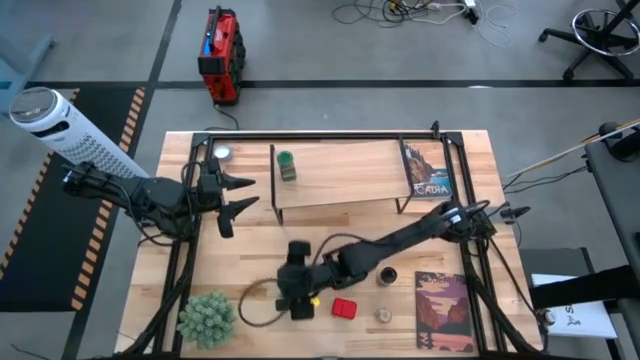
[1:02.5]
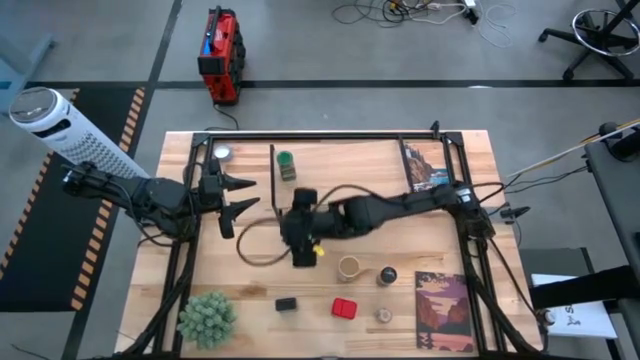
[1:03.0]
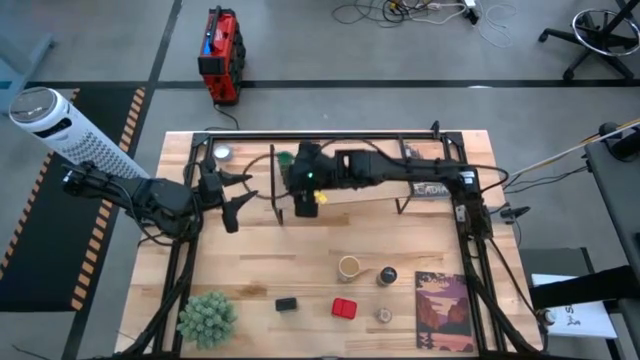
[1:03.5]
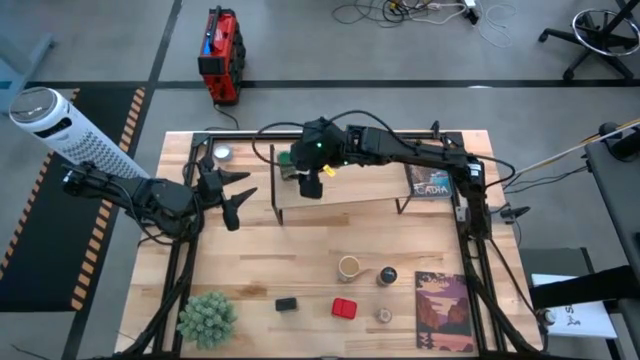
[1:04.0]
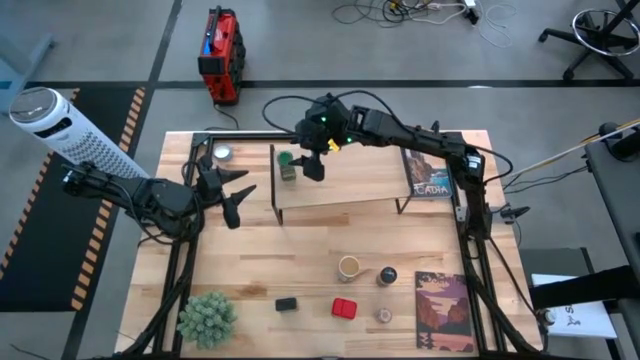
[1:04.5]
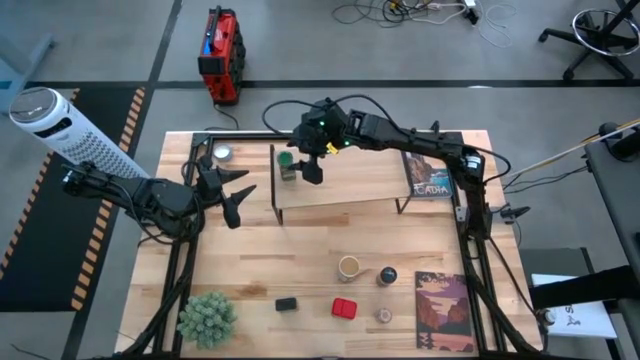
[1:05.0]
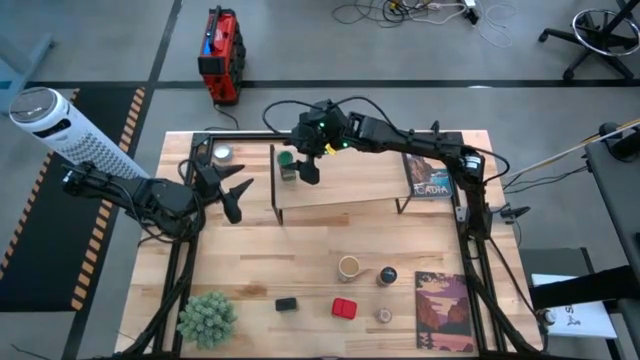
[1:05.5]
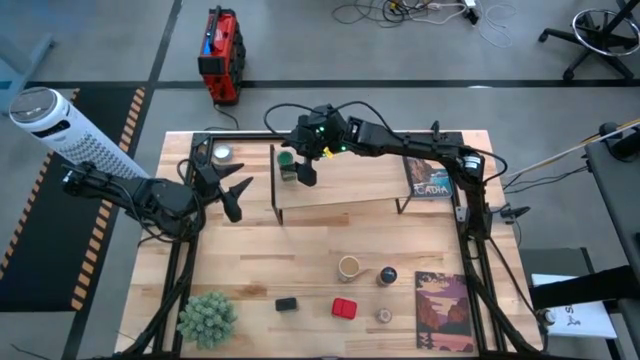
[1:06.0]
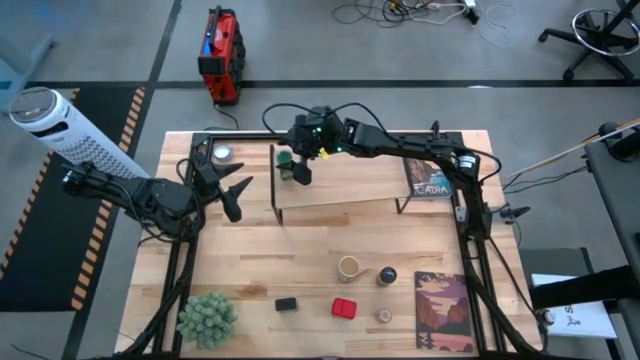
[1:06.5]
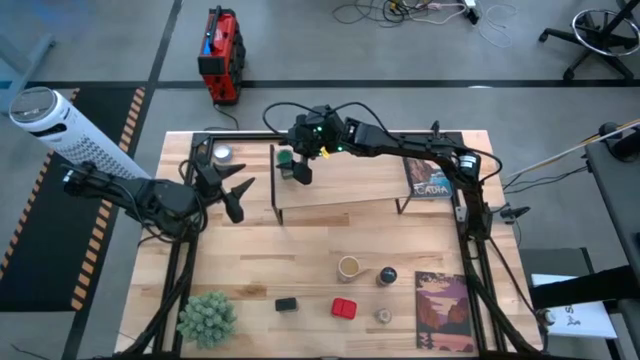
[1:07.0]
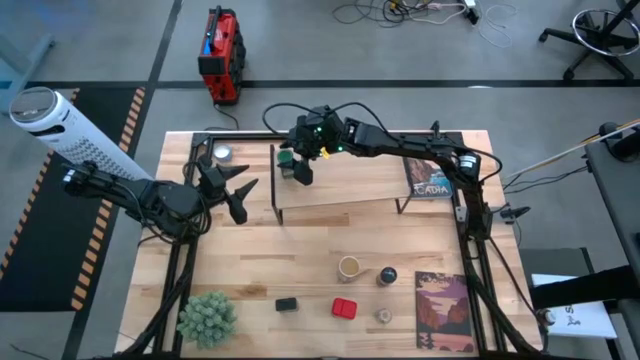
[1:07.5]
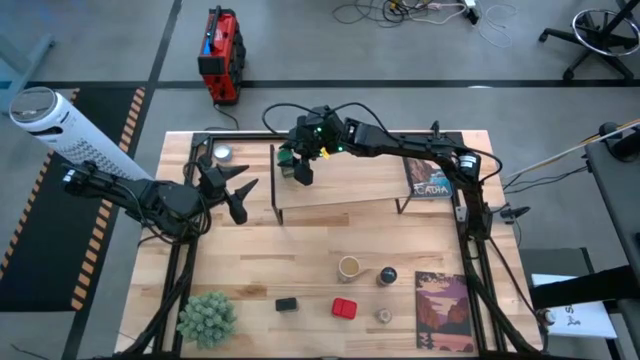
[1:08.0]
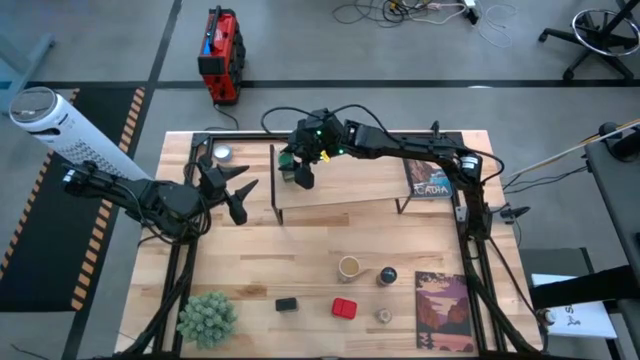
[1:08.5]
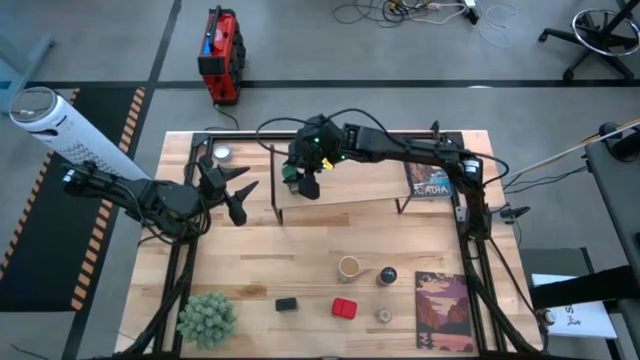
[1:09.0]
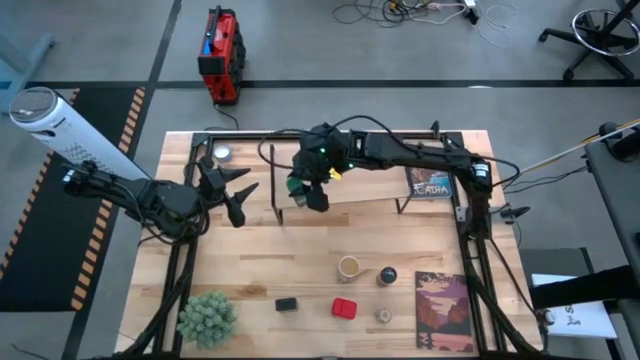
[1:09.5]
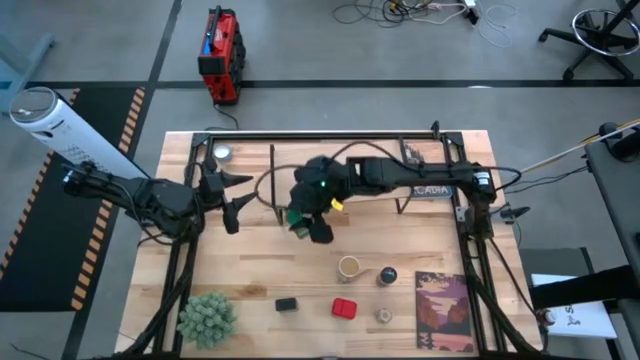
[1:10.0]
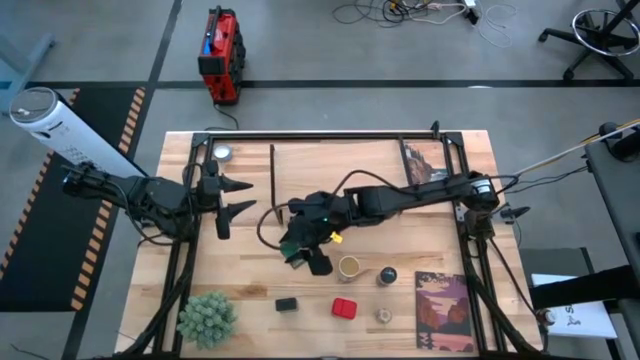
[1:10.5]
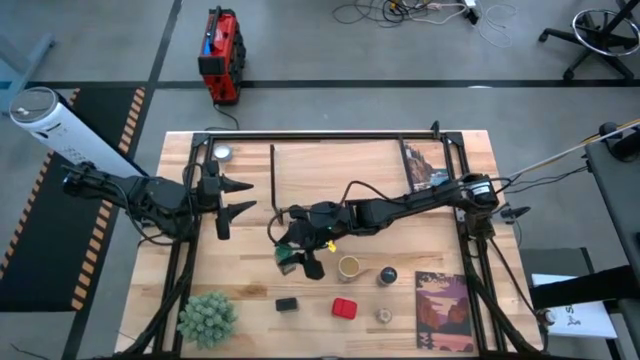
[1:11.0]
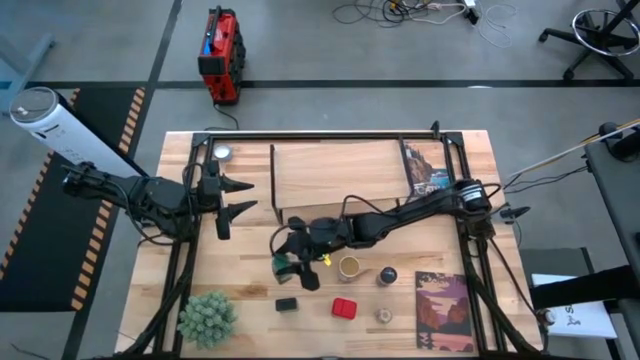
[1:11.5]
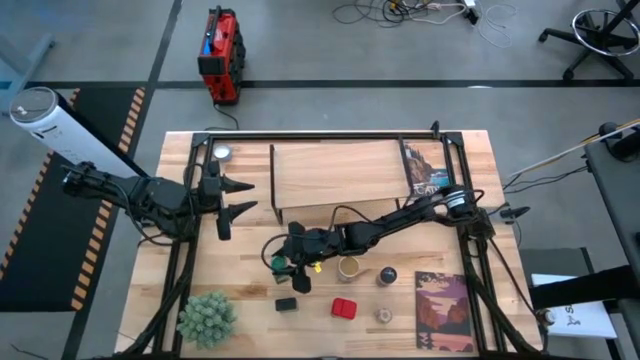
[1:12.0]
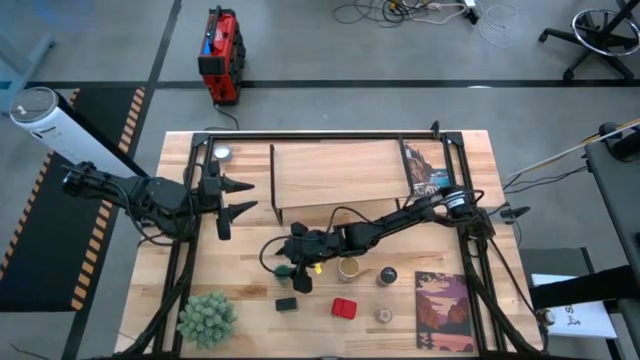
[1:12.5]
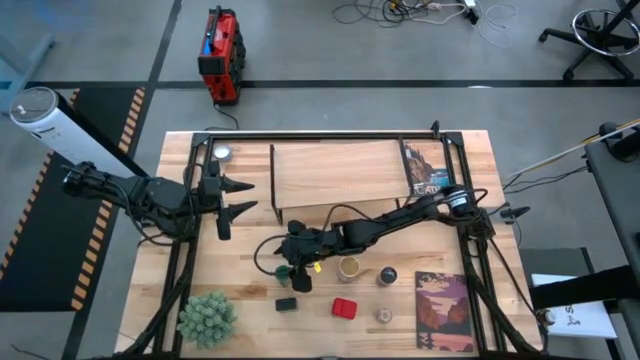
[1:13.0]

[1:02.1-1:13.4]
Task: Shelf spices
Remove the green seasoning bottle from the shelf

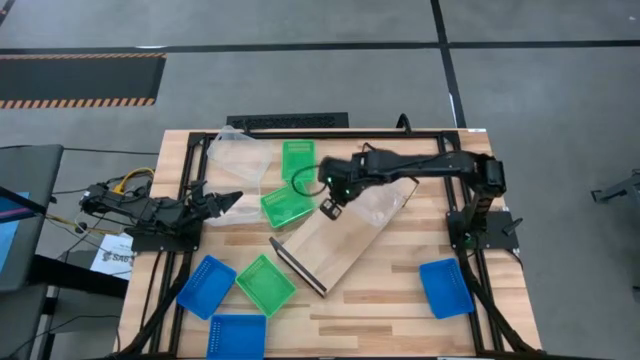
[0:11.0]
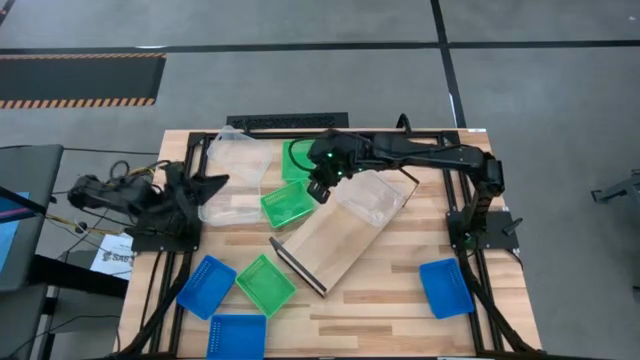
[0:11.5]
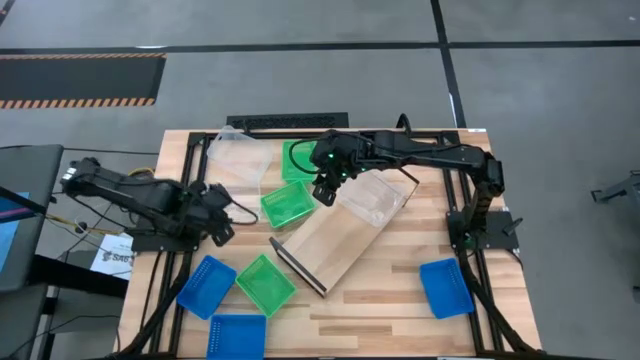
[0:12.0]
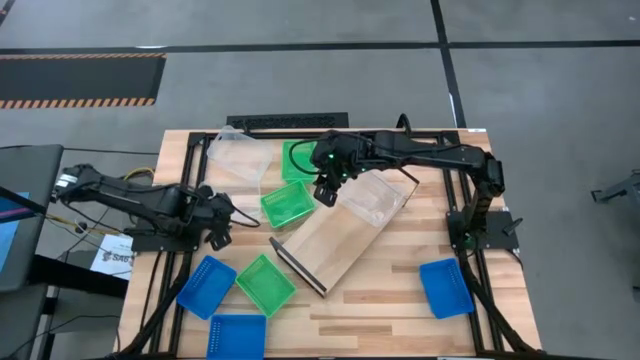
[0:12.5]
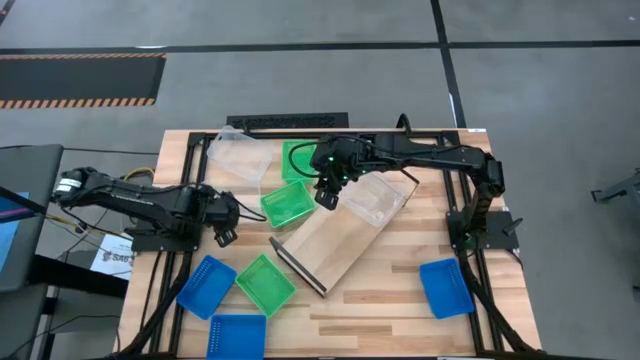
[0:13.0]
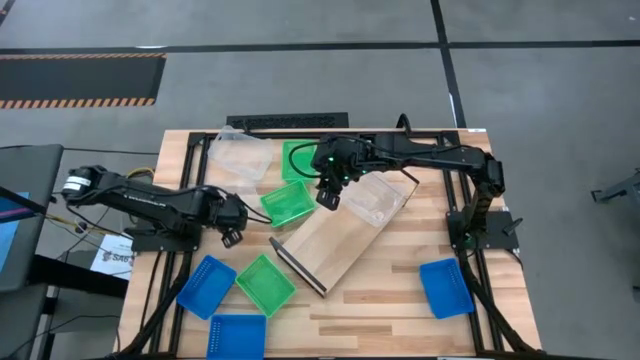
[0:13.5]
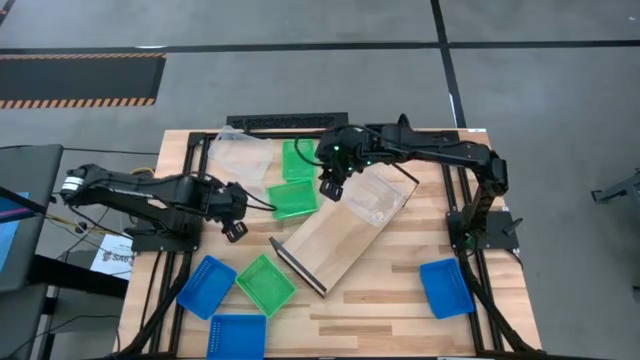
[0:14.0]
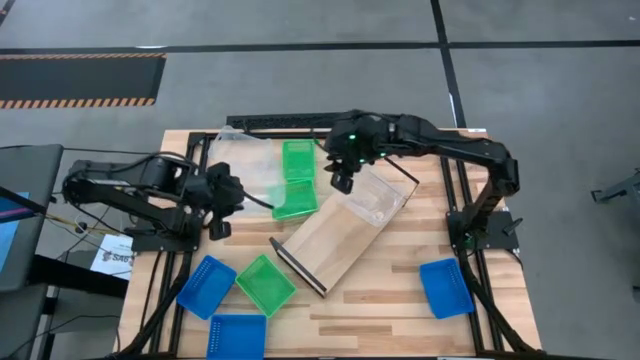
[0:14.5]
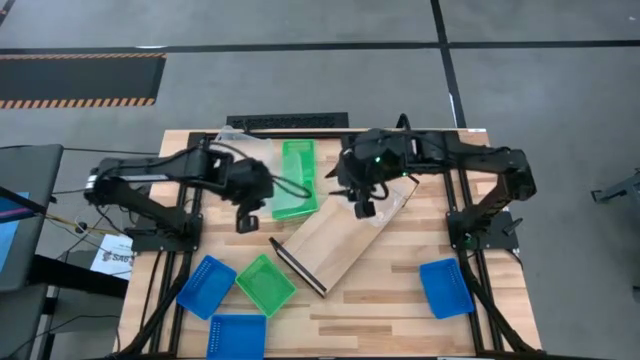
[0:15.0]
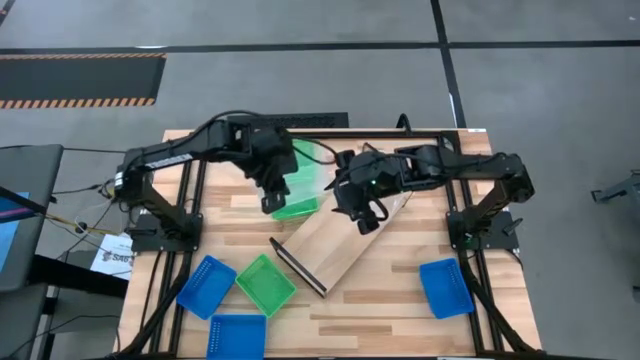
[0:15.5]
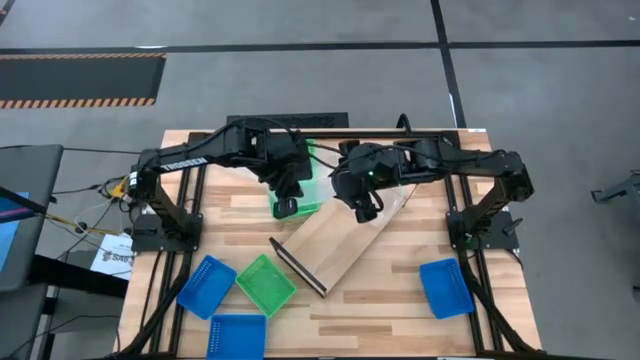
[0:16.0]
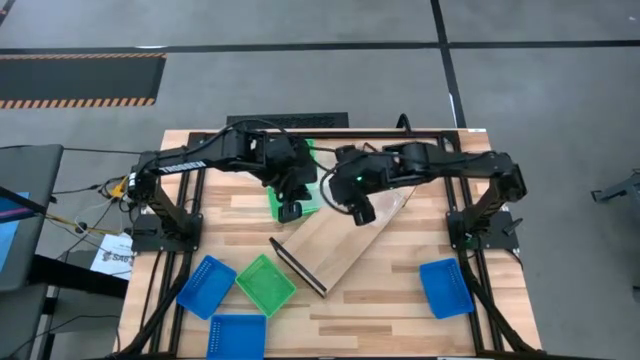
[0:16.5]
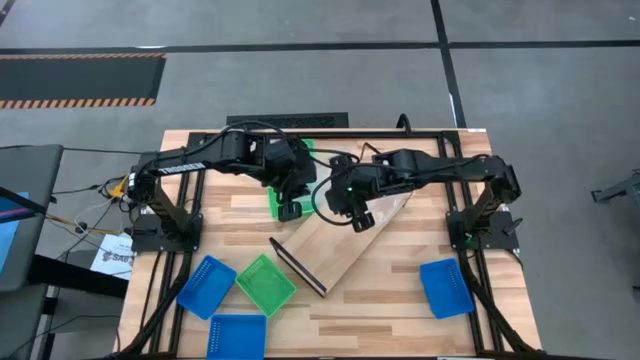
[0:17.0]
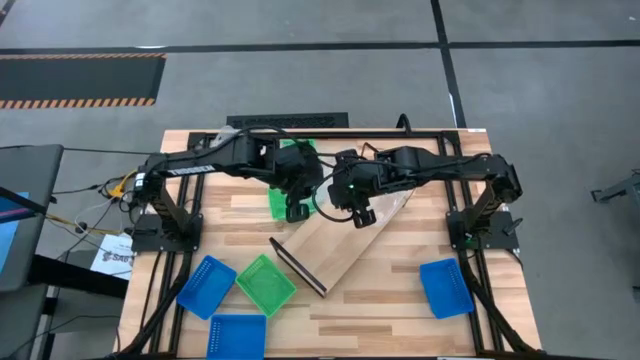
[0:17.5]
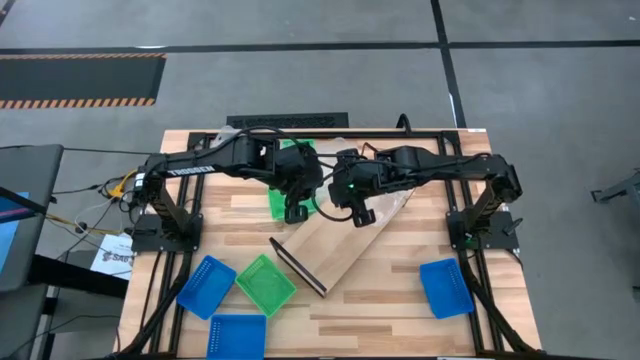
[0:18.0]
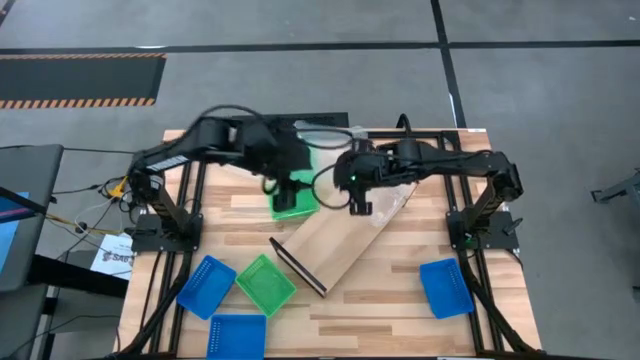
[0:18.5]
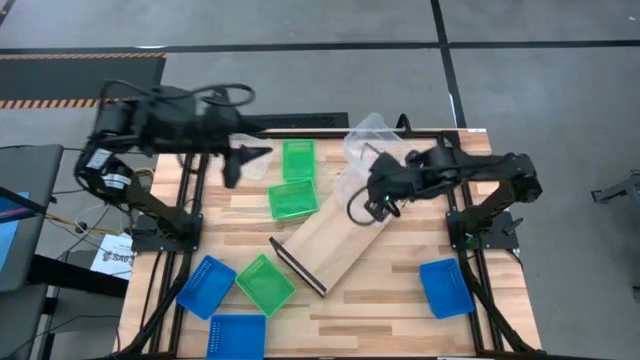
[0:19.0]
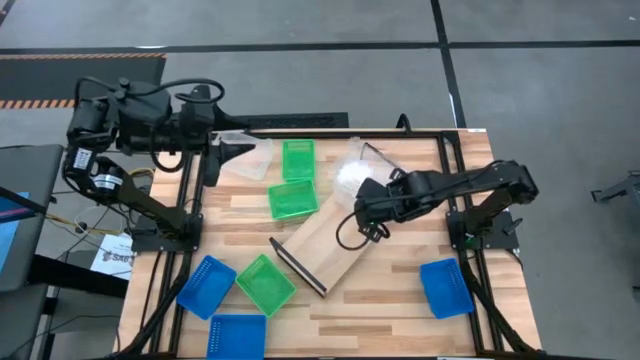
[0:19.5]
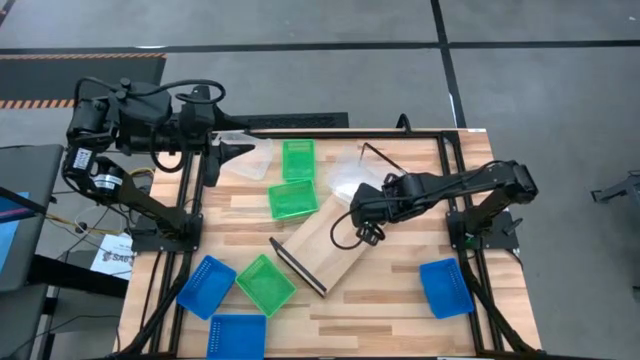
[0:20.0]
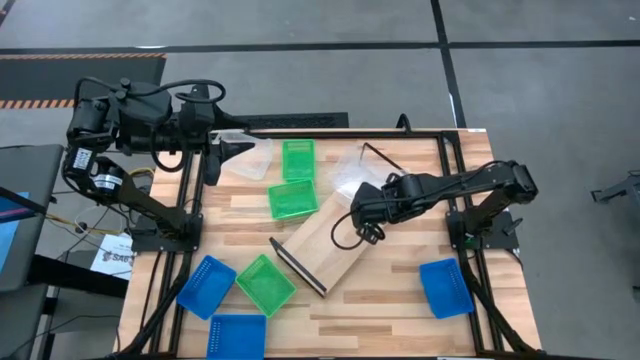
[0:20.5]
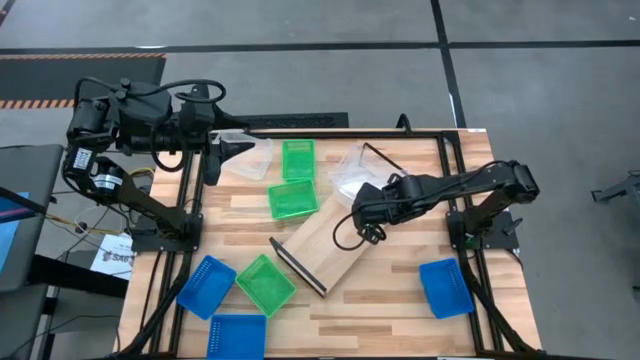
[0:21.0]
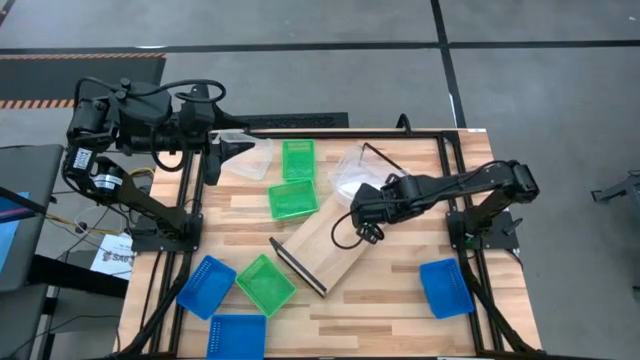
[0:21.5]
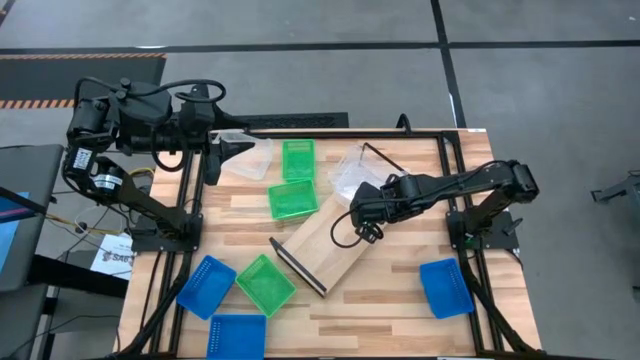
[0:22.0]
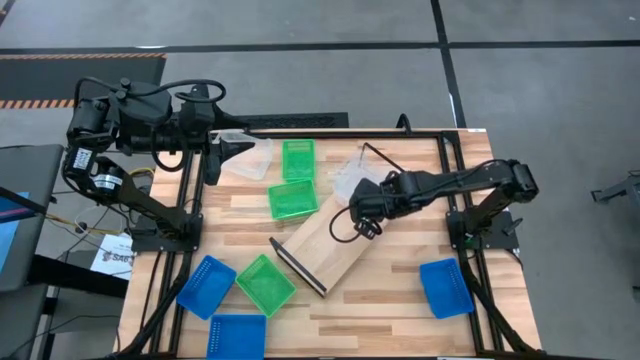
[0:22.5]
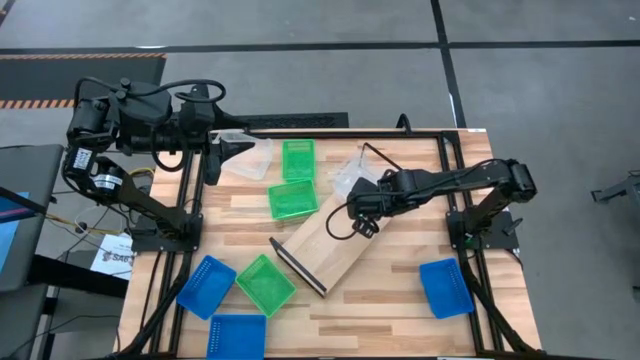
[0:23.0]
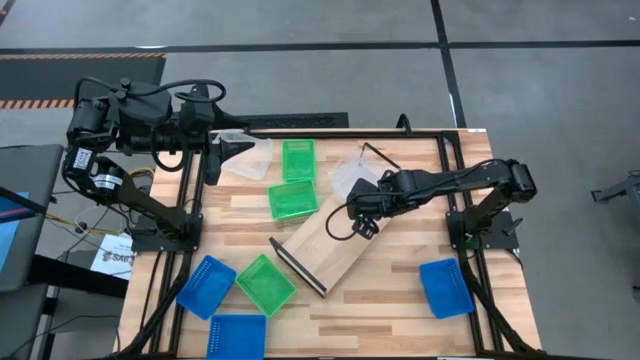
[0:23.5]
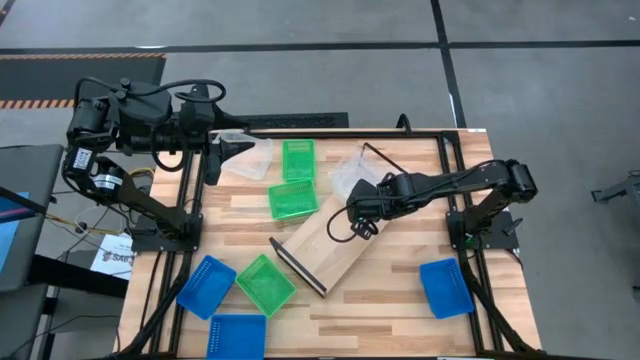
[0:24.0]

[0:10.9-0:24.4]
Task: Stack baskets on shelf by color
Stack the bottom transparent bin on the other transparent bin on the shelf
